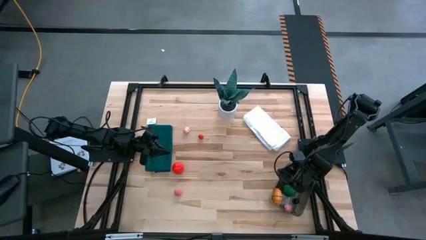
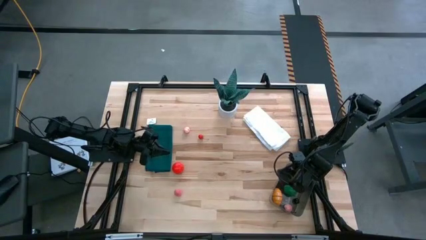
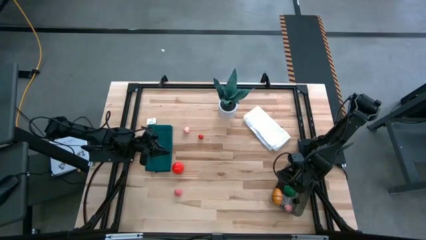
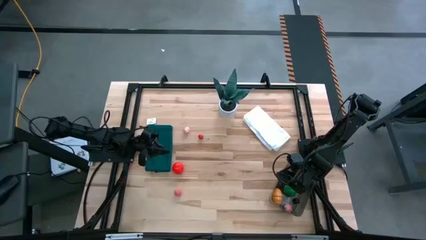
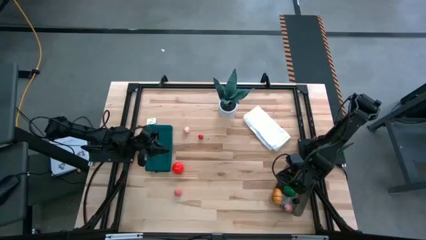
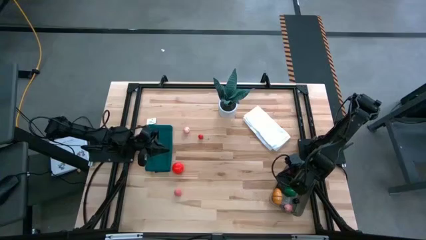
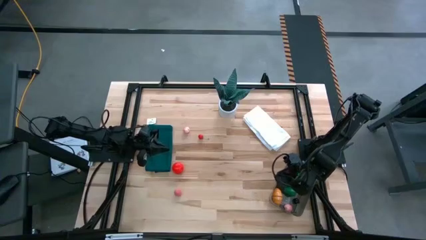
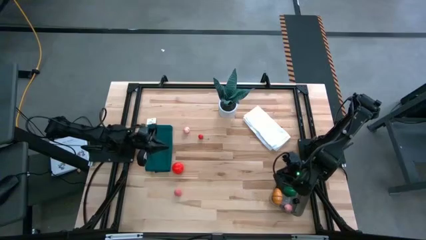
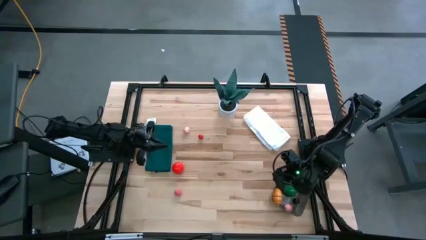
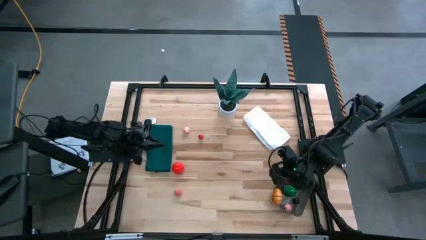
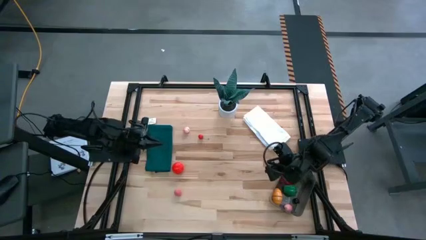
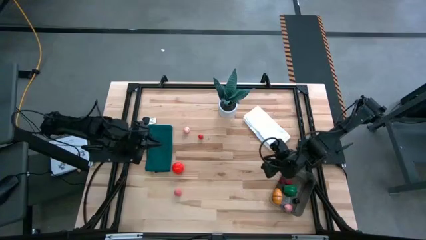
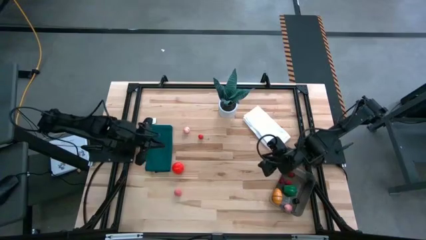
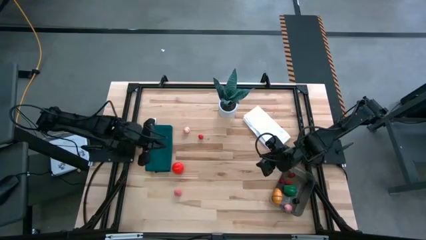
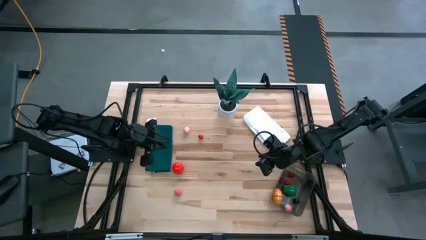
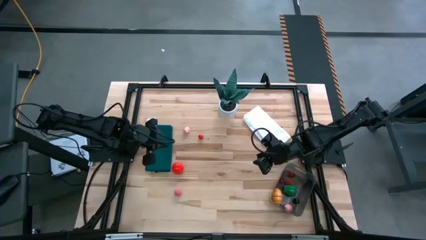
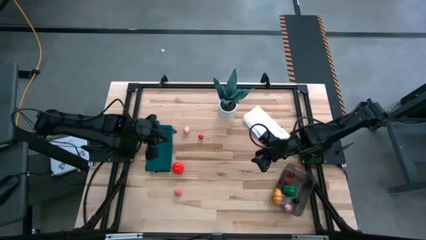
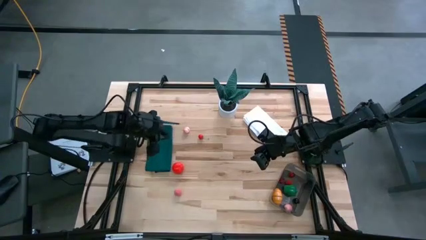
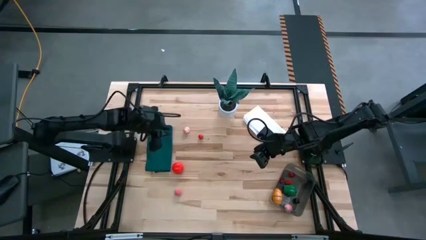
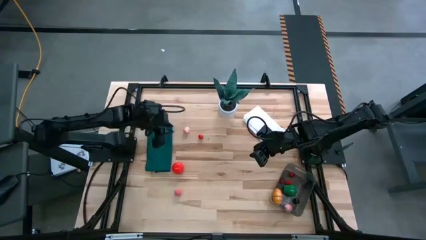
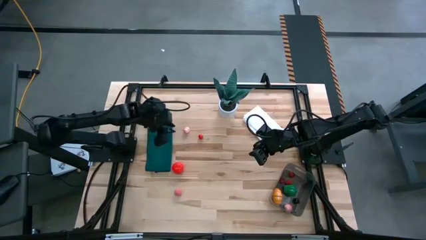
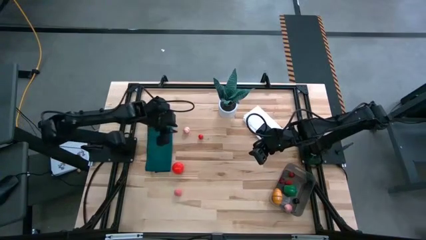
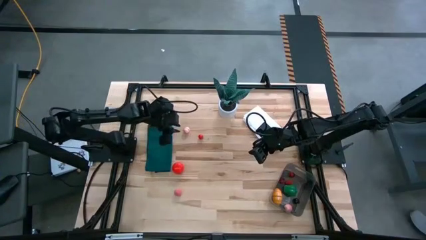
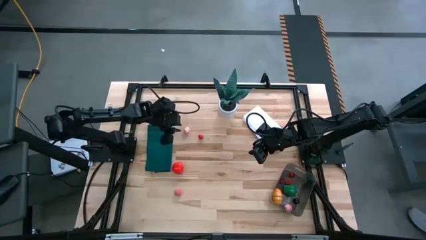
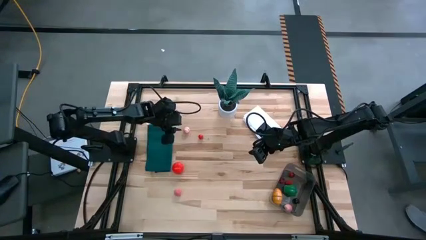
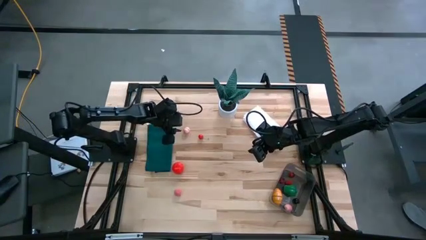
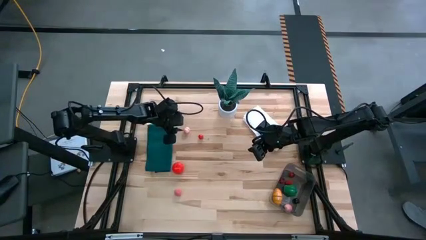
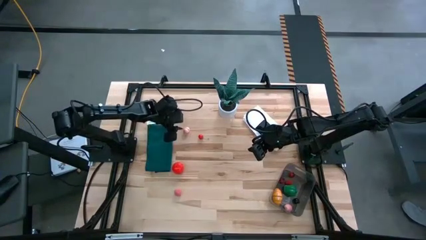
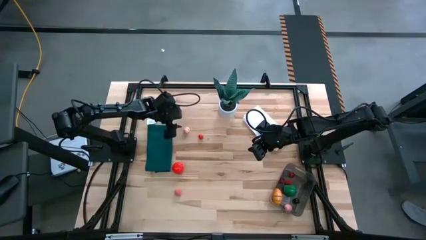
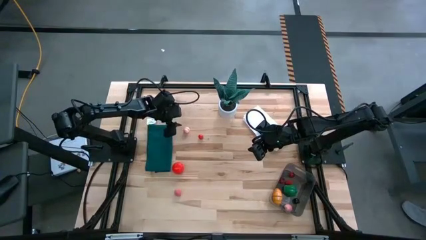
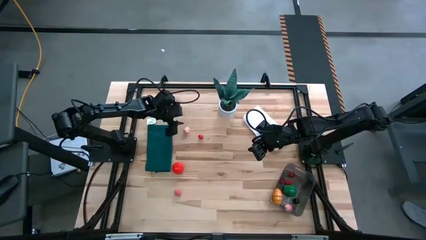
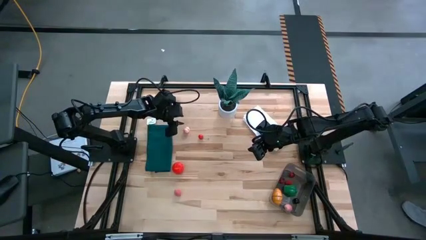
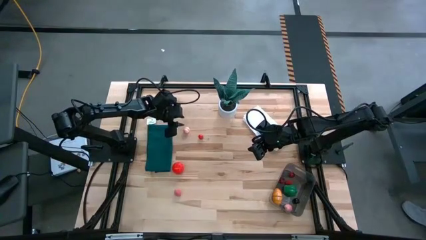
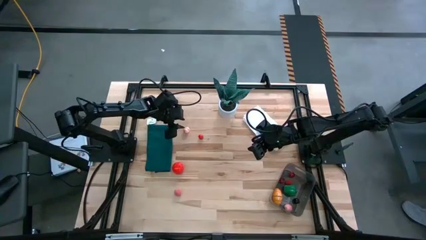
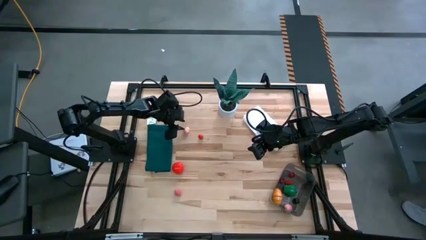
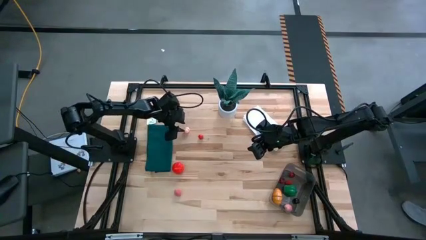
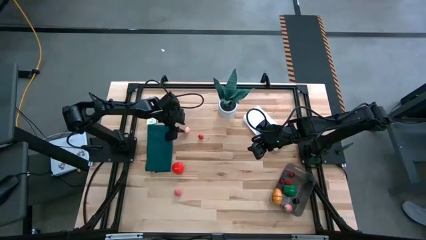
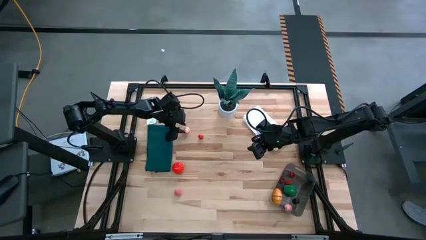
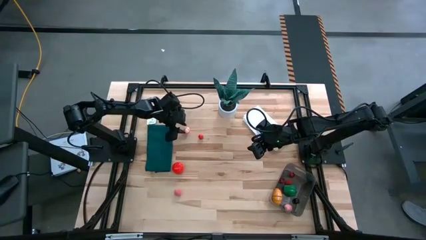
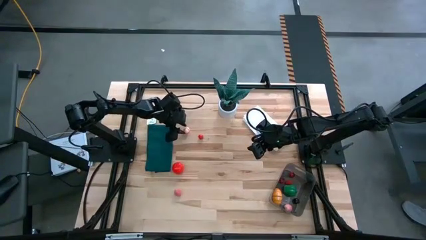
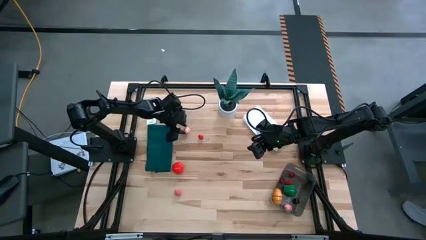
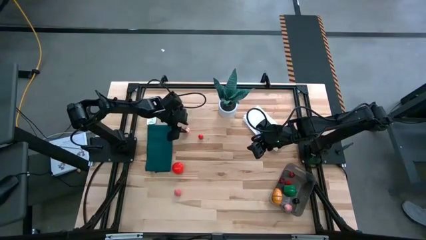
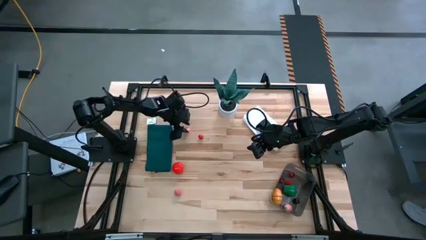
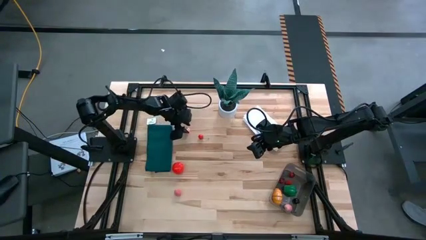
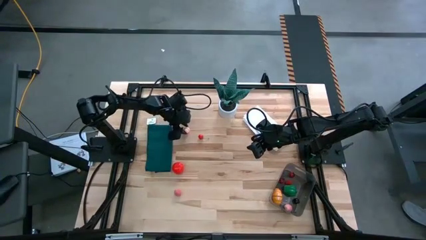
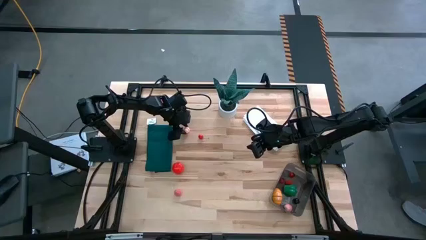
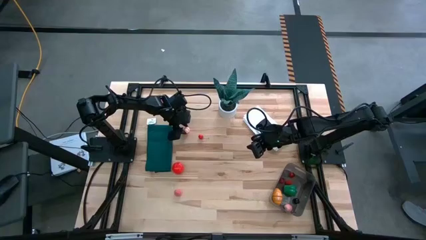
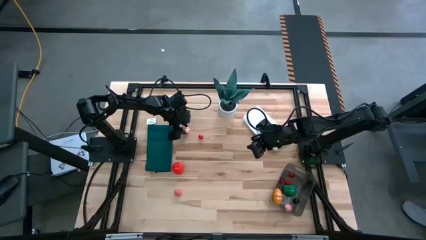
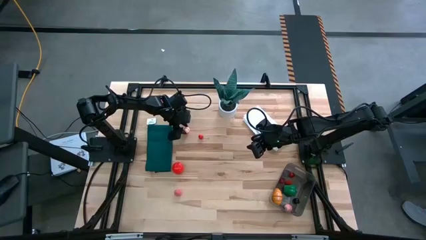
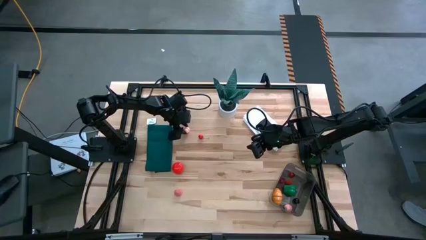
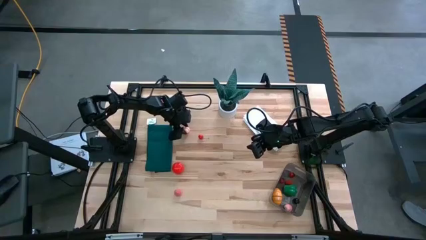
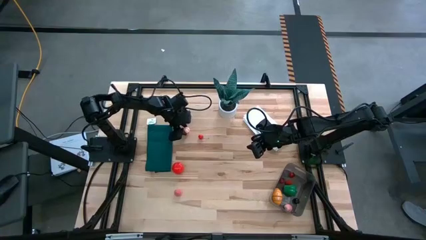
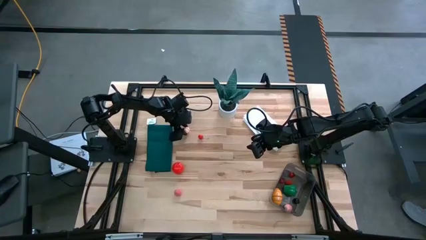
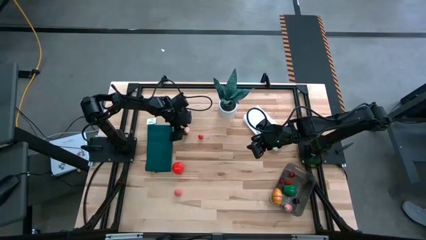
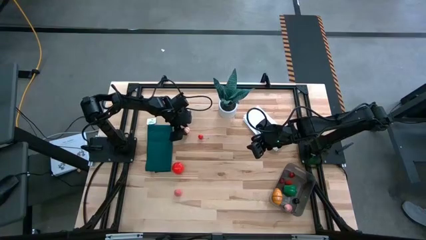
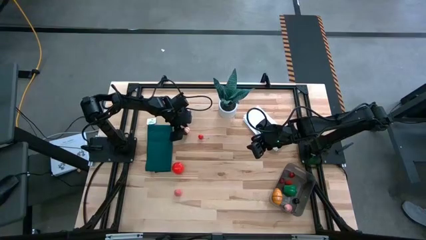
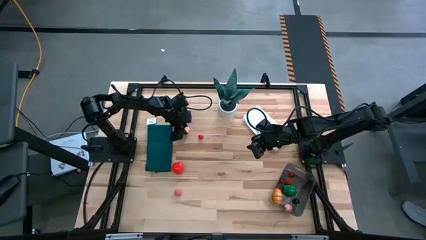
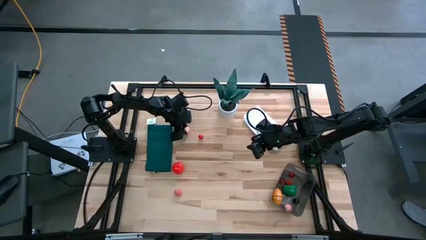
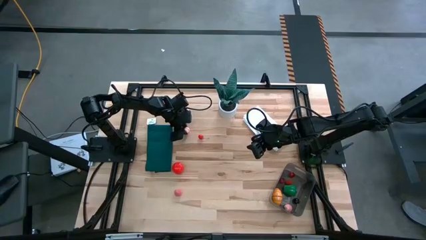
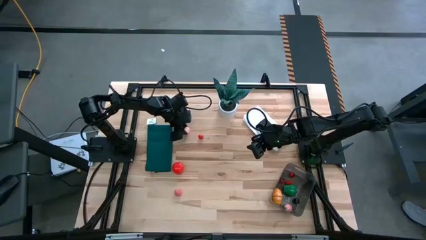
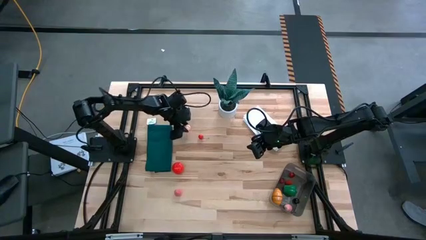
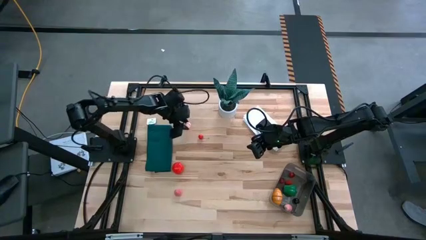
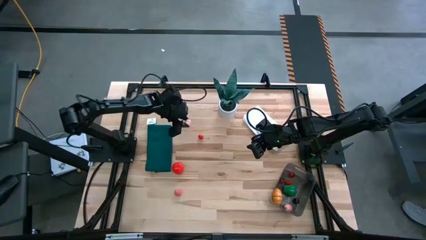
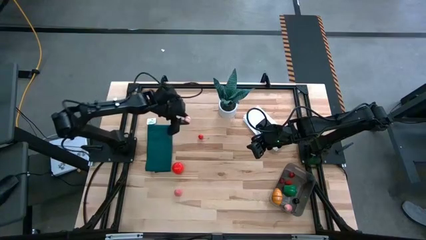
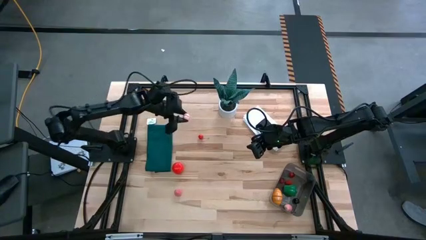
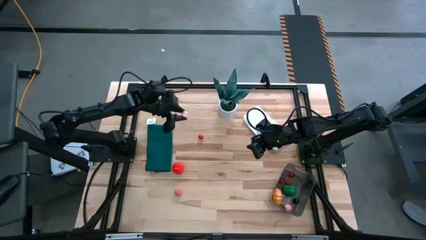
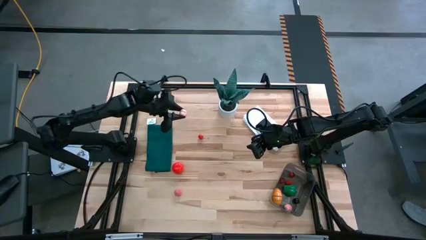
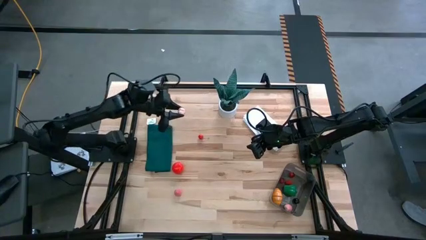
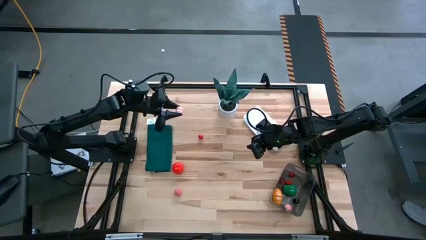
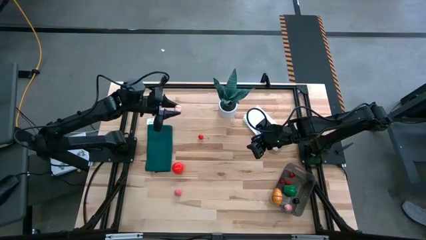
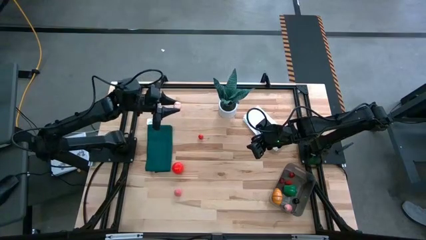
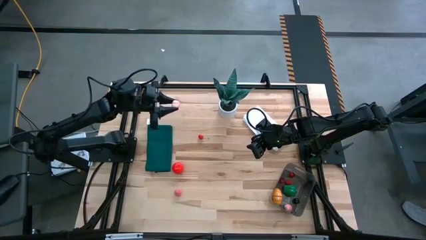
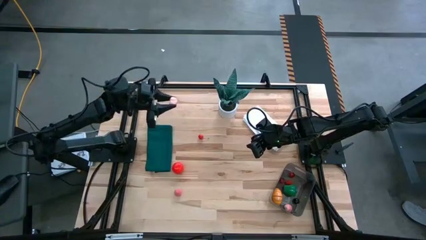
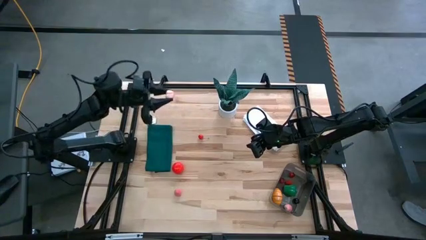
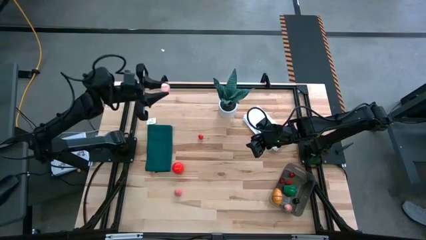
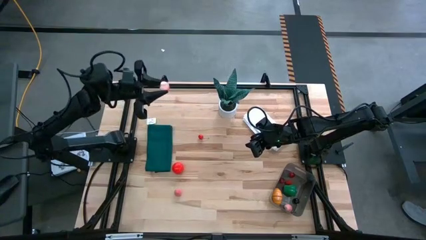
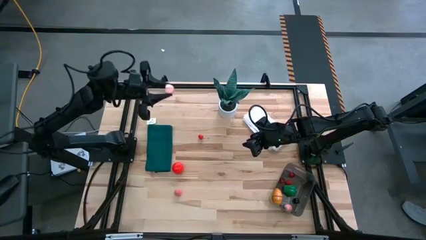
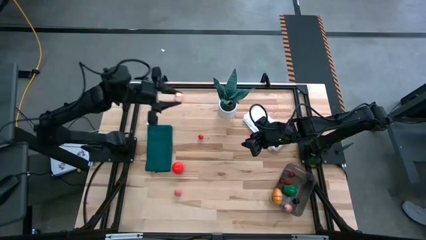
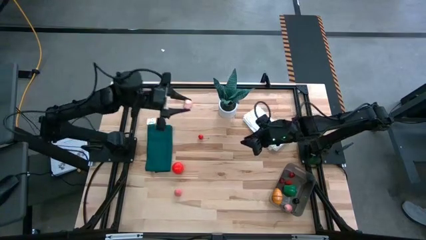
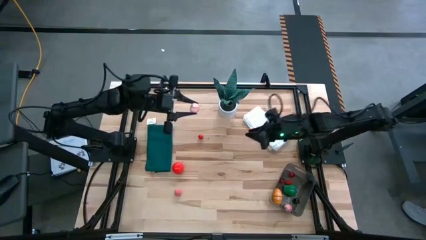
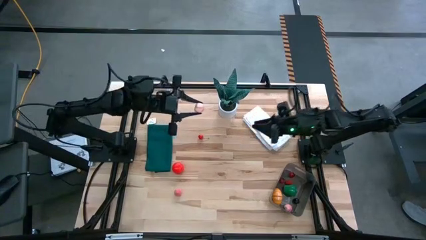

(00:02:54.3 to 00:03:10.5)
Task: Pick and placing Produce into tupperware
Put the top pink peach into the black bin
